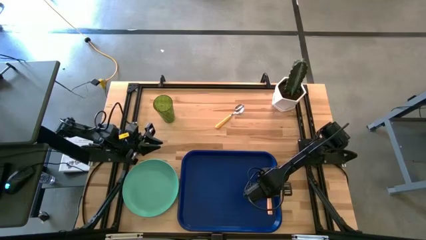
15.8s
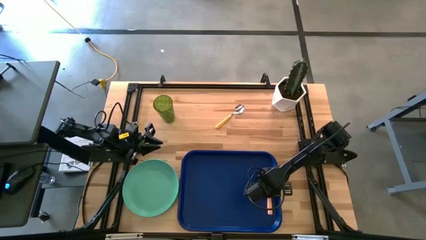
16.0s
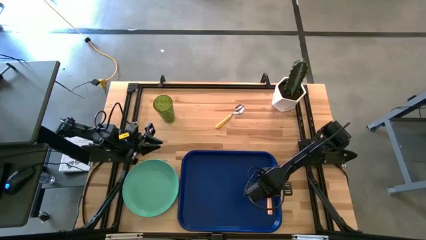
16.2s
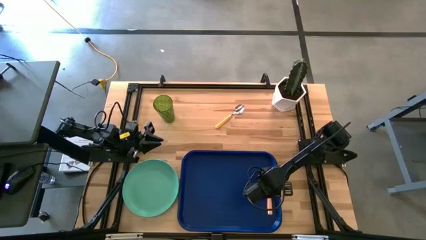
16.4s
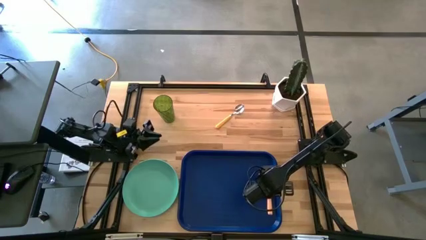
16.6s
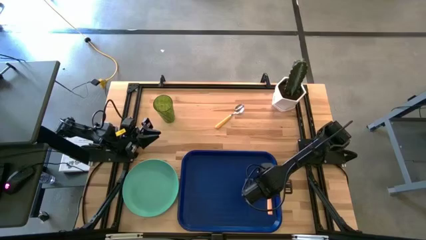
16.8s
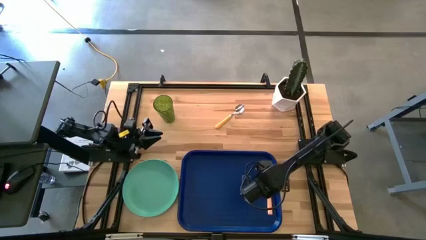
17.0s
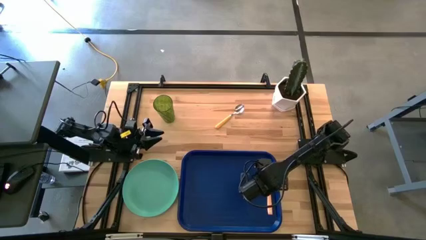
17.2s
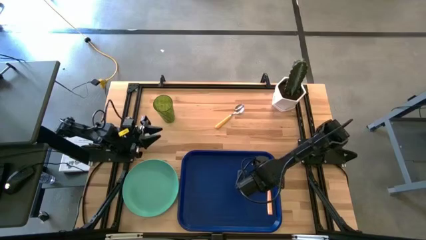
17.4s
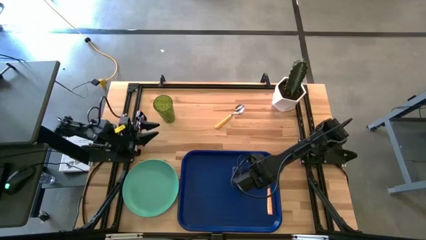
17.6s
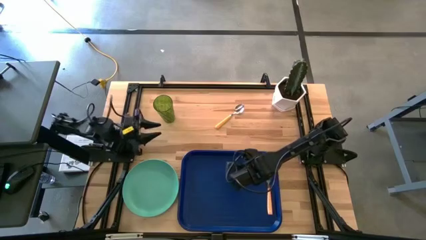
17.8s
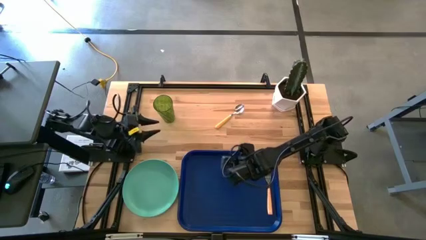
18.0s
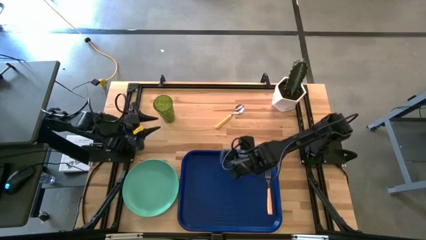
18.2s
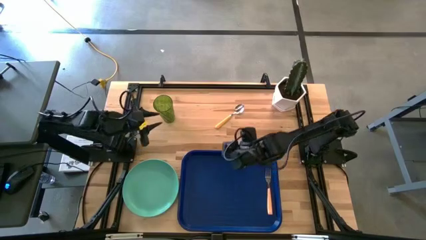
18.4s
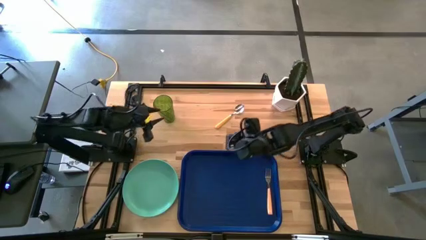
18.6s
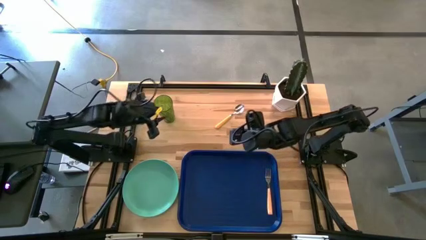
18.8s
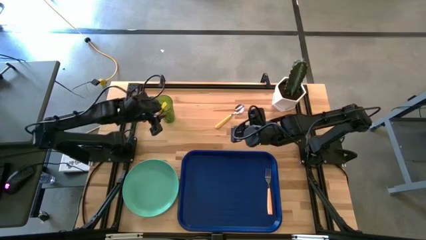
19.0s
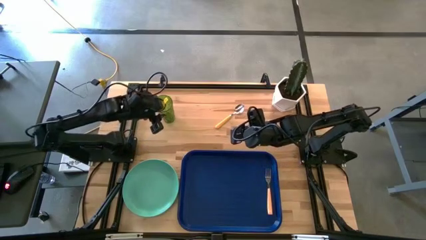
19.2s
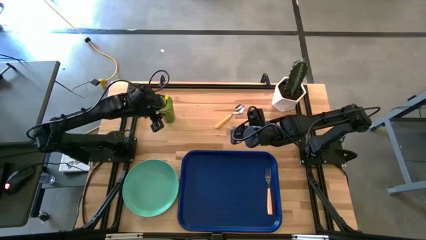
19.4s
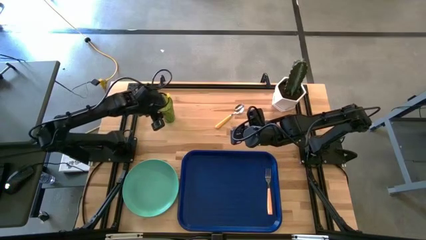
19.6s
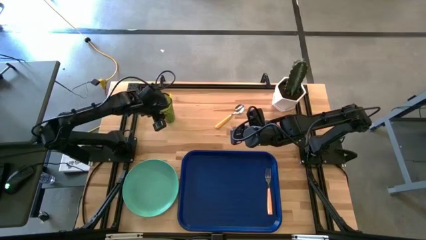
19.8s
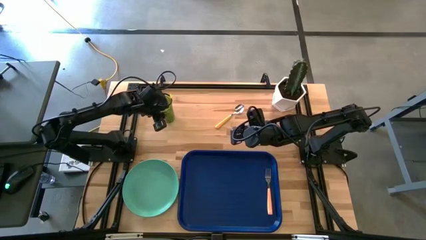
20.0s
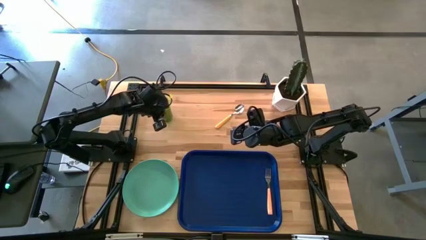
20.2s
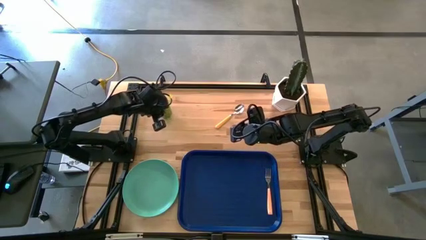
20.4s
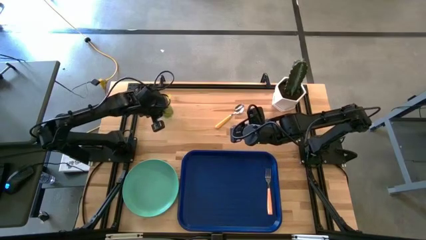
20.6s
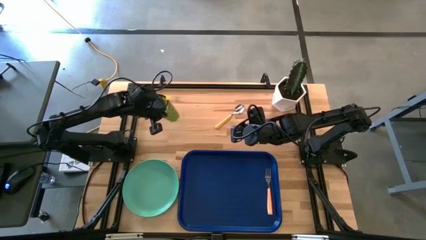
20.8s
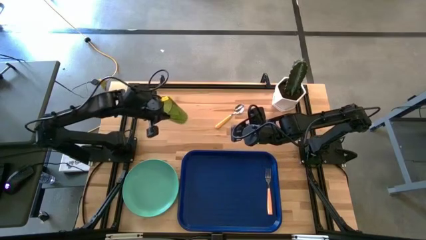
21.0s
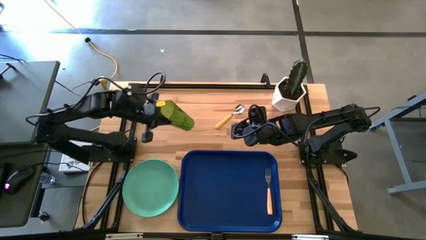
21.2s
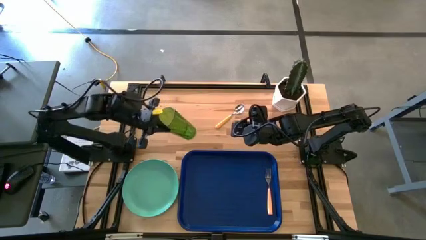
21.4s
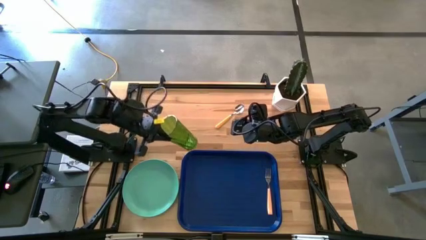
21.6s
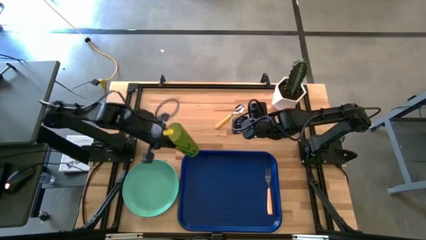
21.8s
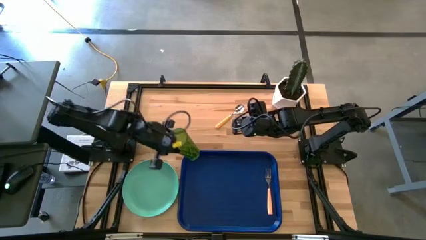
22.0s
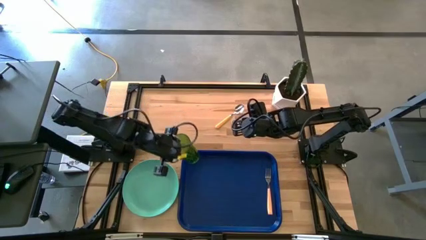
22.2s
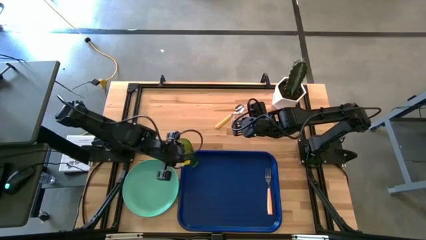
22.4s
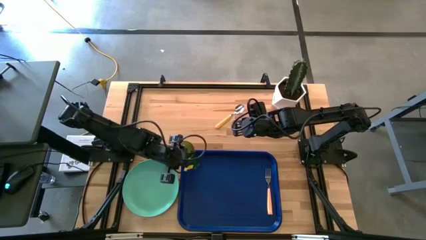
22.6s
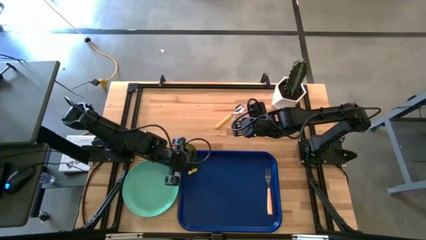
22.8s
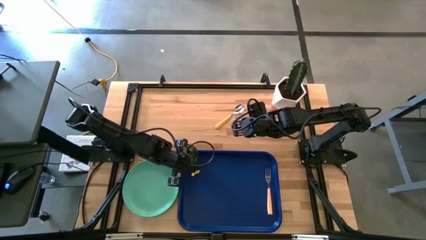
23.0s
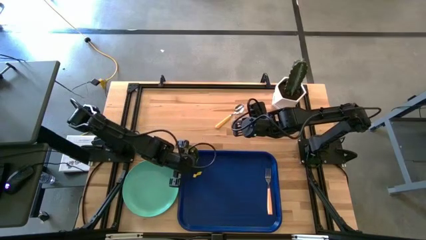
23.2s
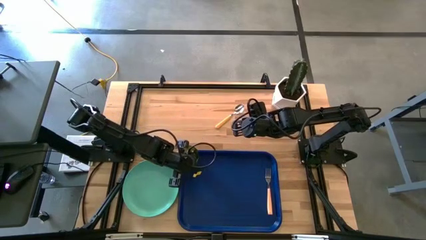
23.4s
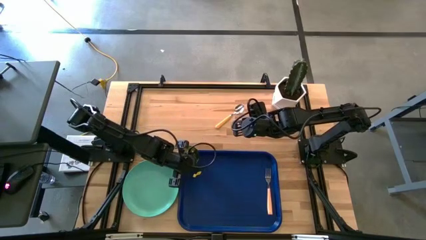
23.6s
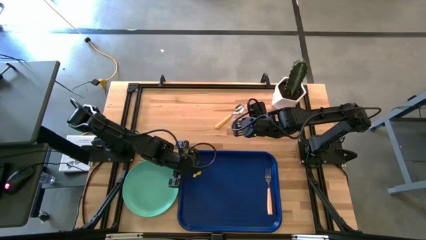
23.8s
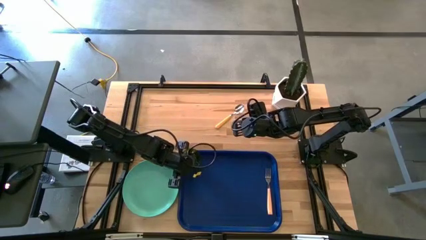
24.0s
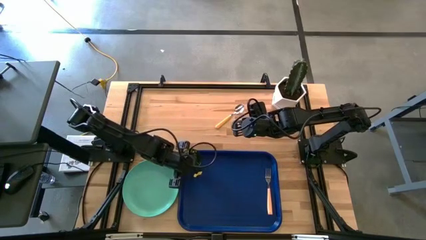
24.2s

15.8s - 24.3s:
Task: Pick and place plate/cup/fork/spoon on tray
Put the green cup on the top left of the blue tray

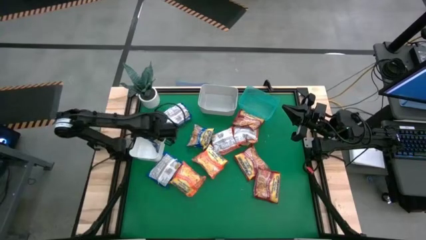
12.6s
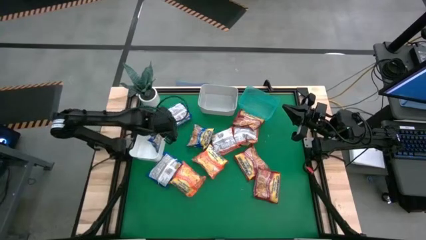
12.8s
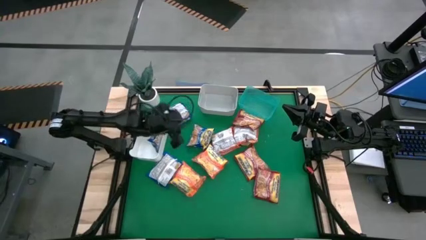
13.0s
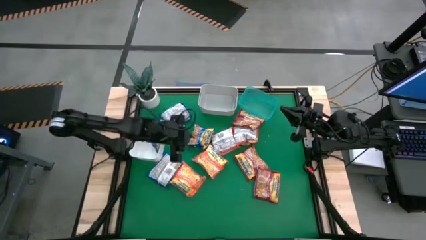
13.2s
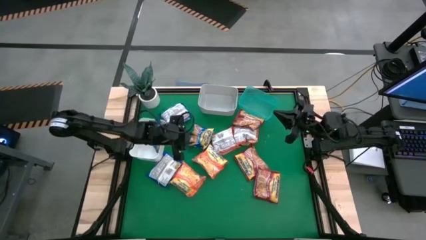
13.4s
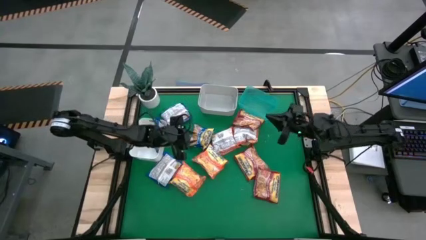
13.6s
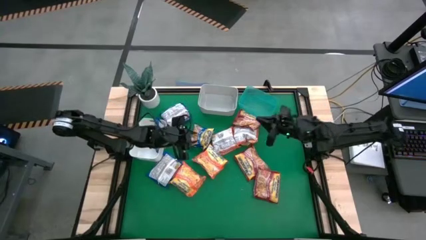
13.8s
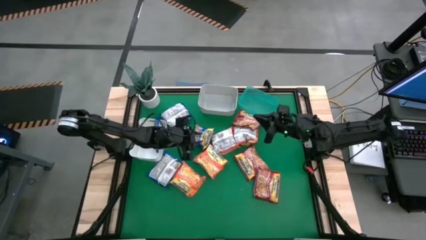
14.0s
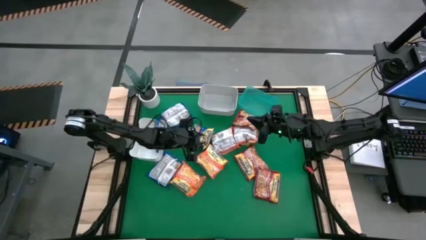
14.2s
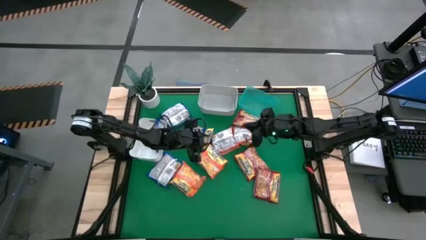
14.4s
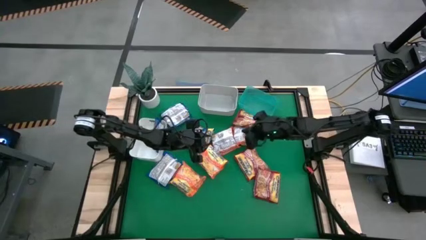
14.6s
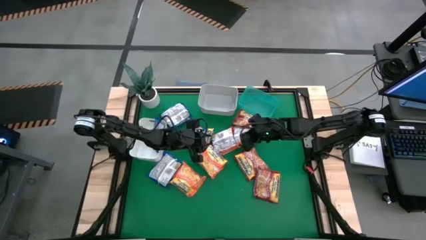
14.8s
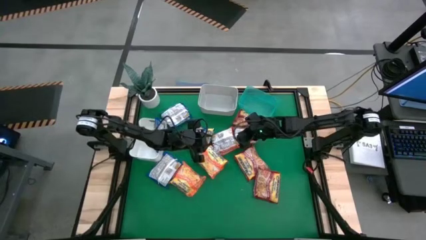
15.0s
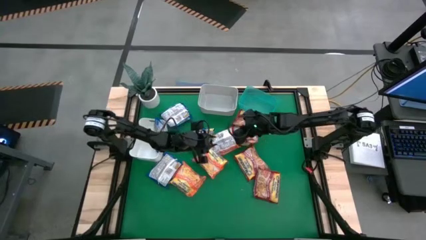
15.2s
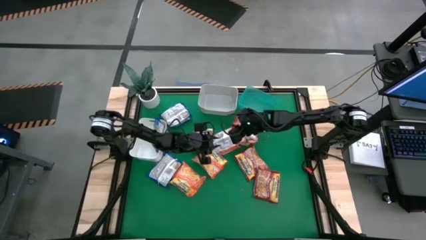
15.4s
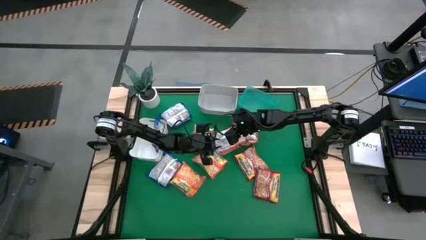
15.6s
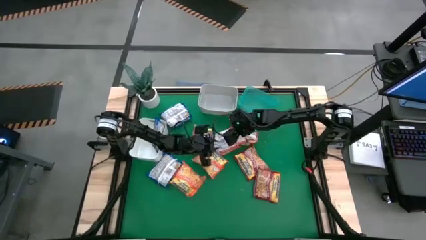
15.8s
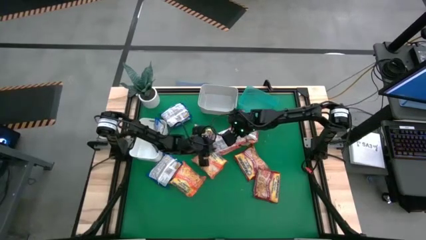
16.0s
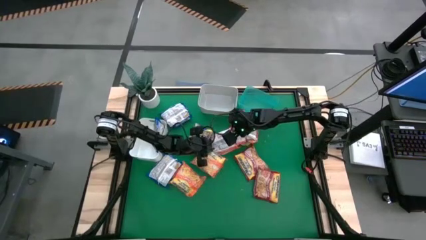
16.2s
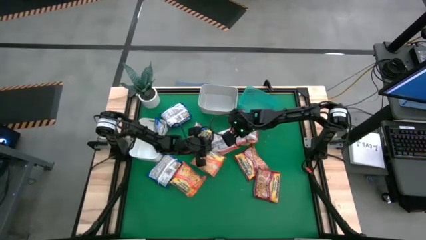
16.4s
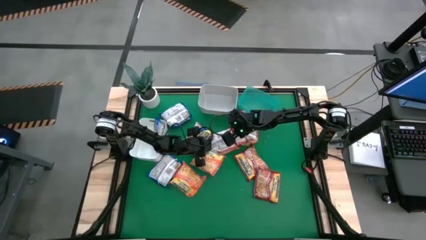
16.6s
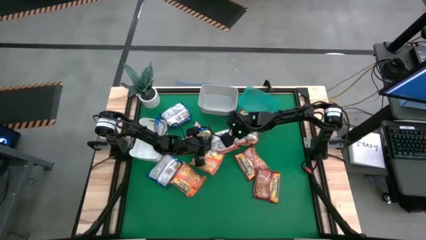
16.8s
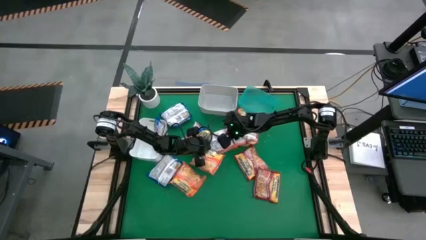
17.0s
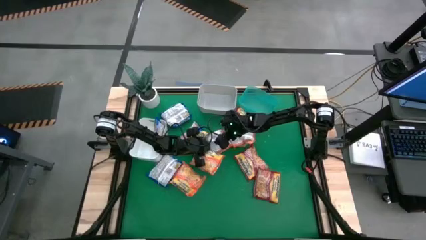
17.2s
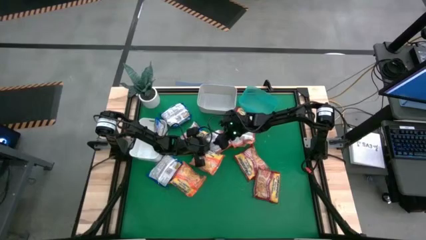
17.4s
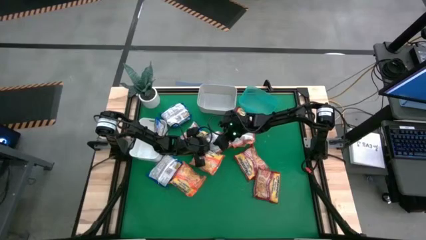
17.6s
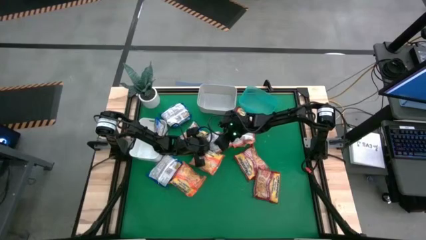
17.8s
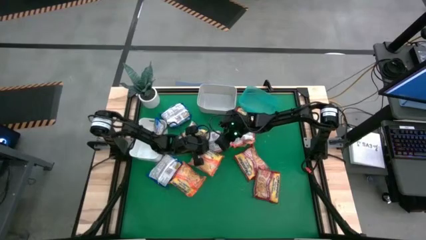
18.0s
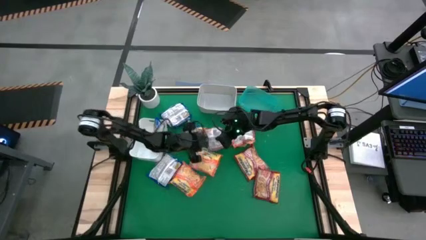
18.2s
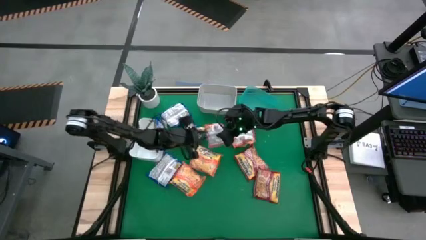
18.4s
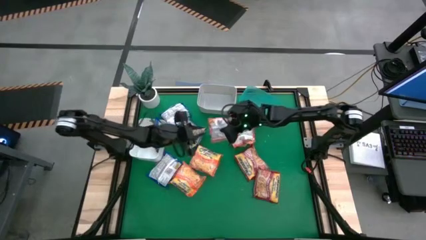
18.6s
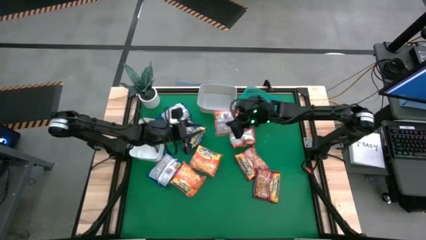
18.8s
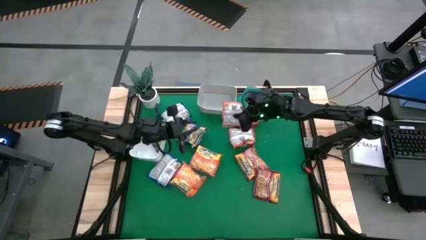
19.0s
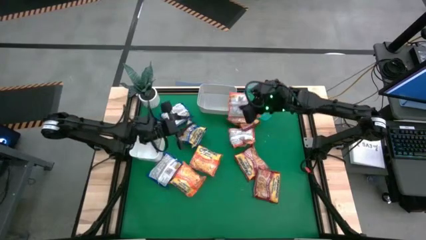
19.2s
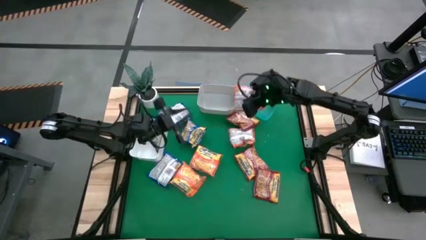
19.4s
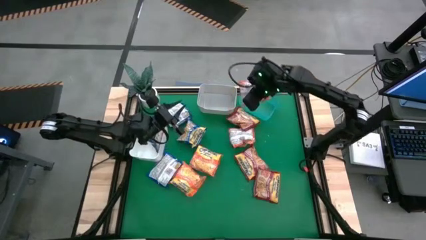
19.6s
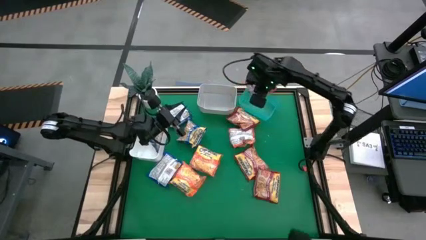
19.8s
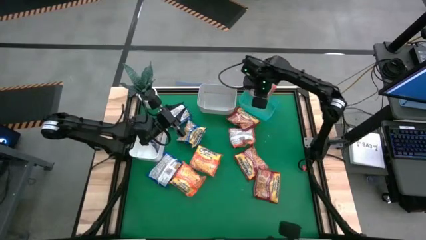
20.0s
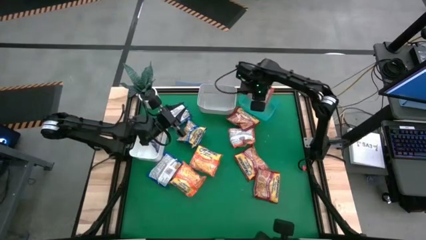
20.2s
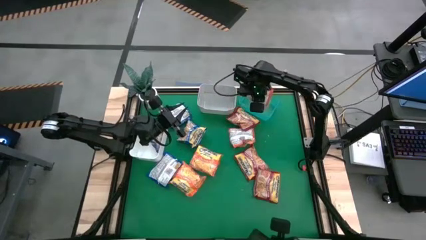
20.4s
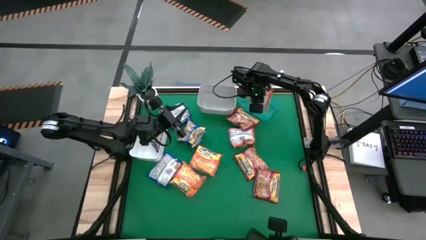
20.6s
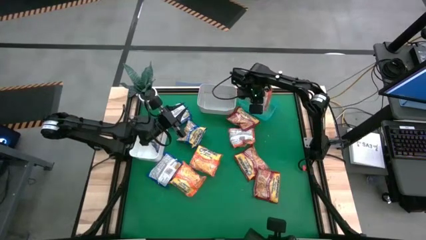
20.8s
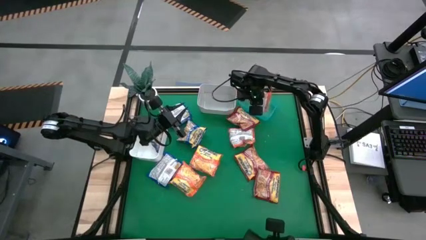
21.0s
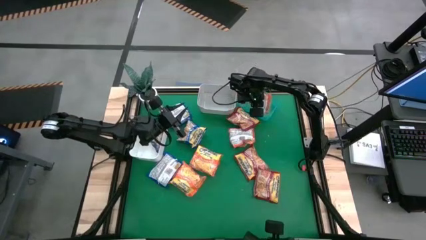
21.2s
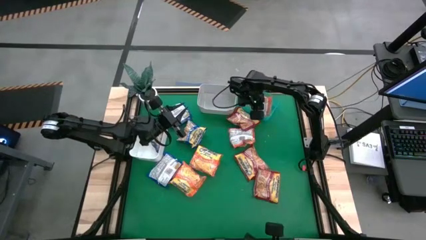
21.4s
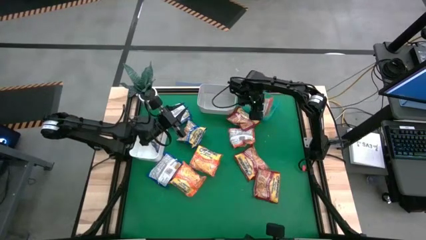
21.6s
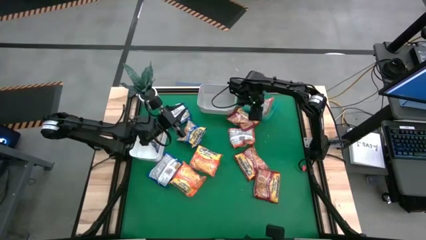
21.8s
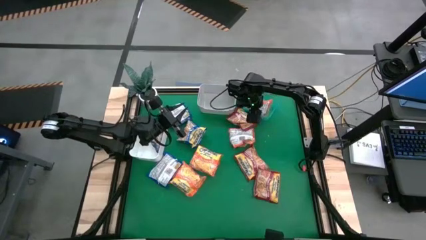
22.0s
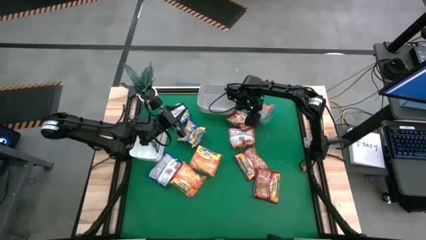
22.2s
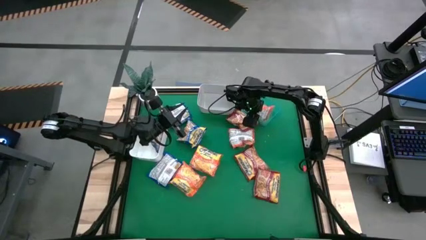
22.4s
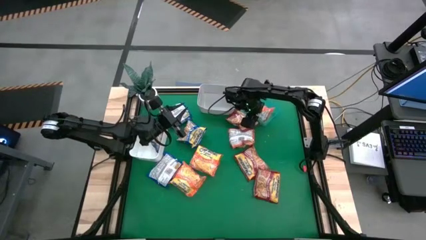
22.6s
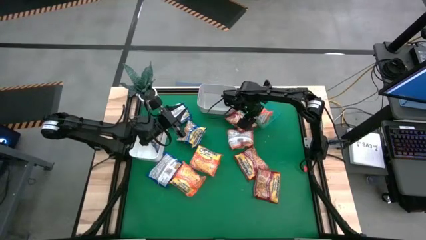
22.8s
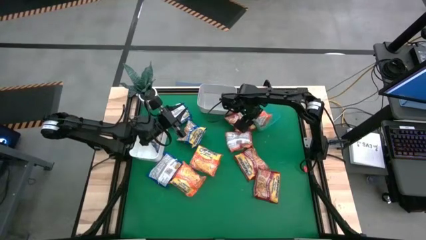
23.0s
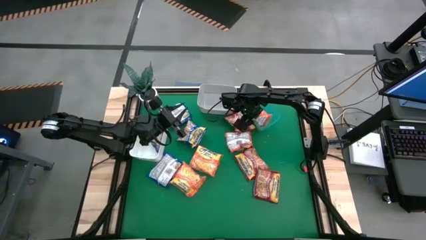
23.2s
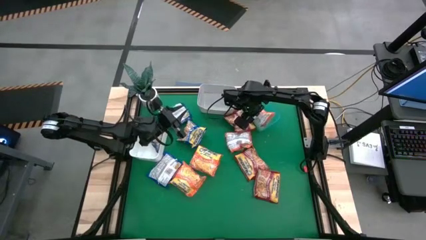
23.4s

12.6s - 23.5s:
Task: Sort Maruchan noodles
Put the orange noodle pack into the green bin
